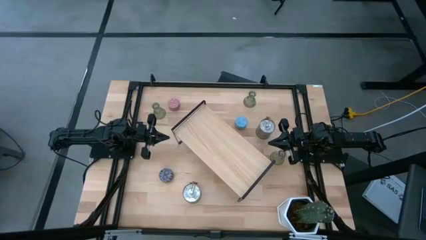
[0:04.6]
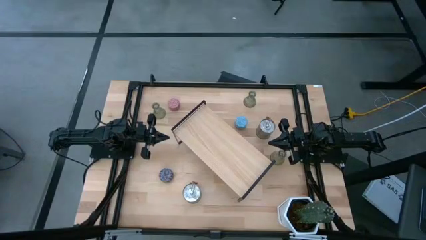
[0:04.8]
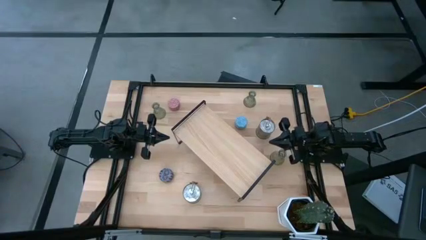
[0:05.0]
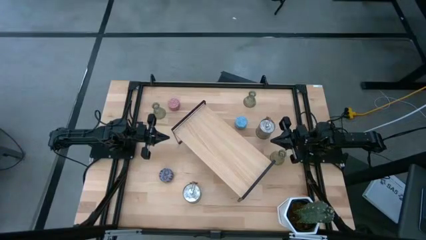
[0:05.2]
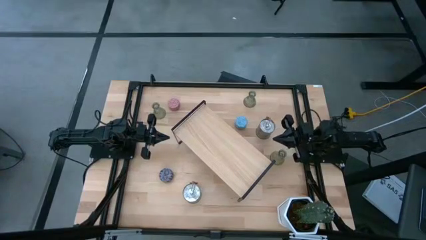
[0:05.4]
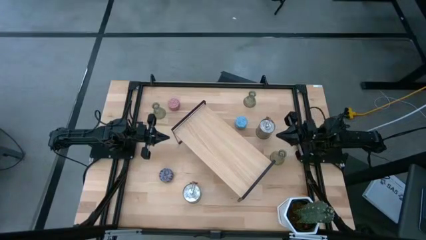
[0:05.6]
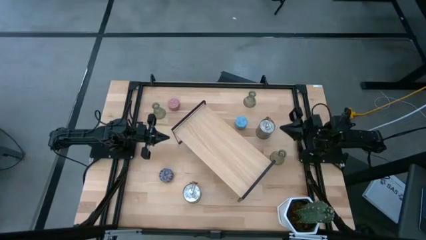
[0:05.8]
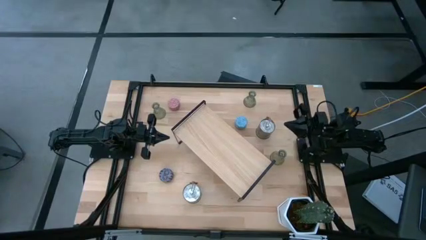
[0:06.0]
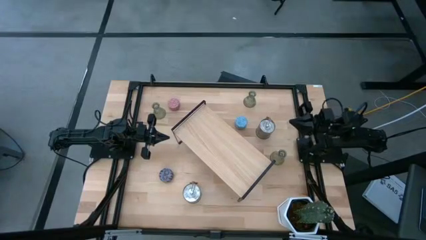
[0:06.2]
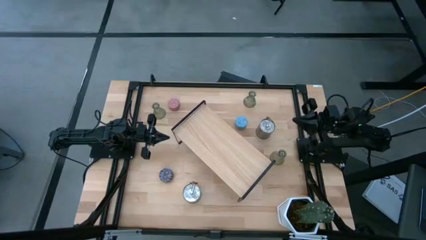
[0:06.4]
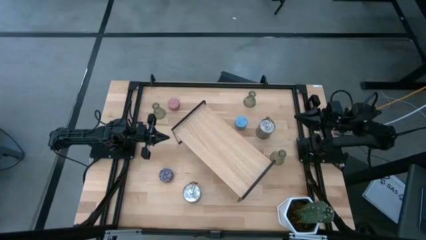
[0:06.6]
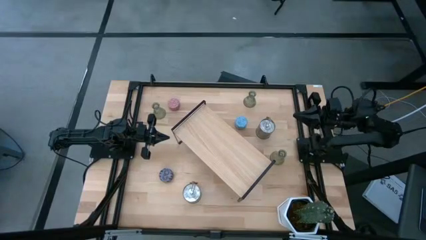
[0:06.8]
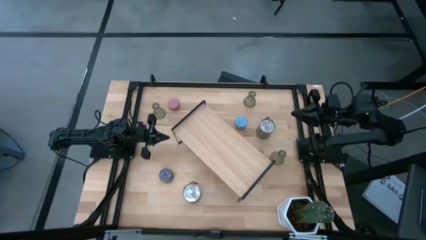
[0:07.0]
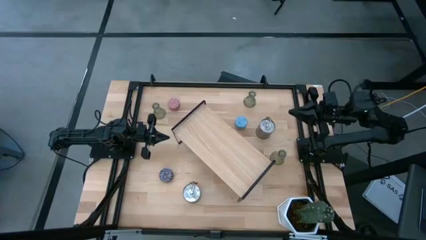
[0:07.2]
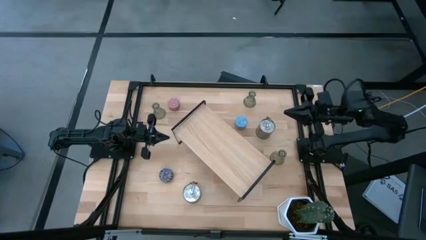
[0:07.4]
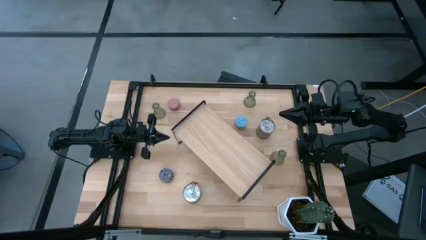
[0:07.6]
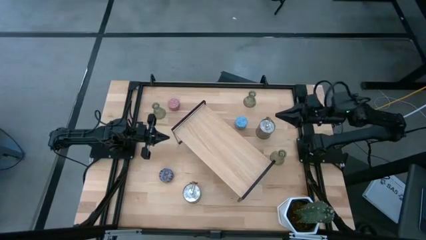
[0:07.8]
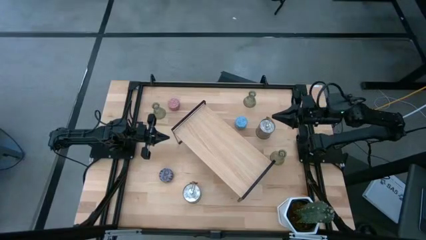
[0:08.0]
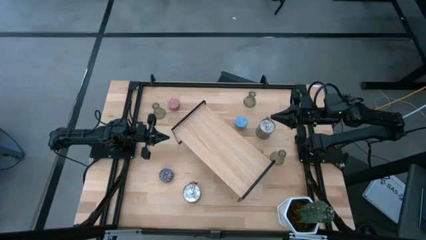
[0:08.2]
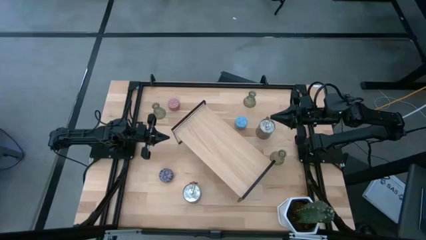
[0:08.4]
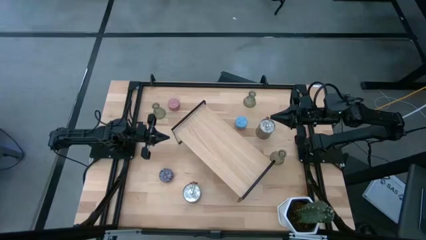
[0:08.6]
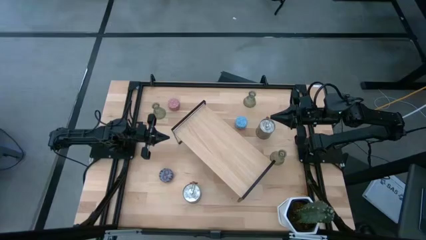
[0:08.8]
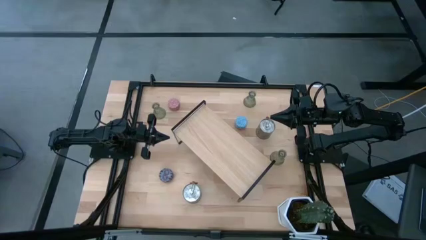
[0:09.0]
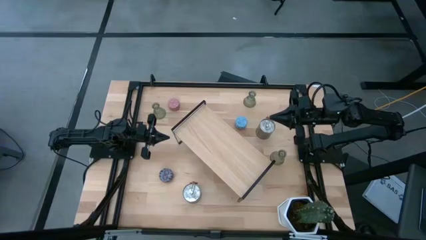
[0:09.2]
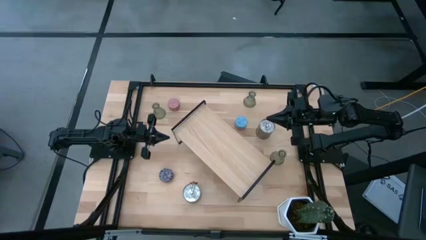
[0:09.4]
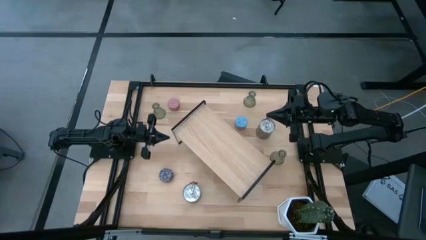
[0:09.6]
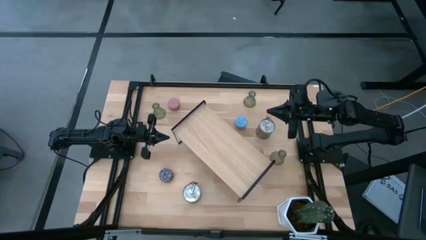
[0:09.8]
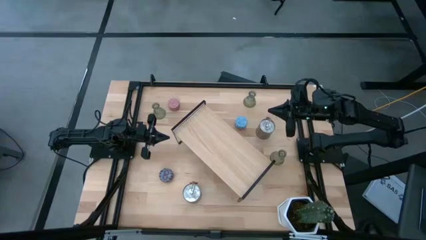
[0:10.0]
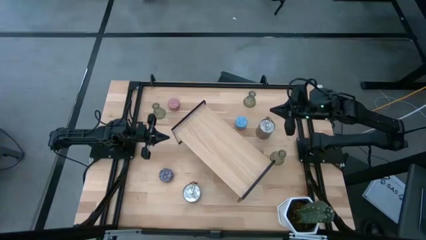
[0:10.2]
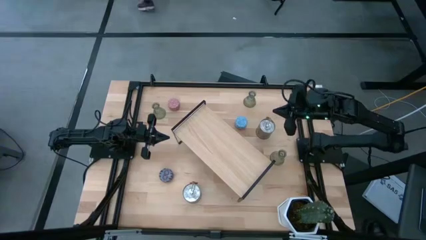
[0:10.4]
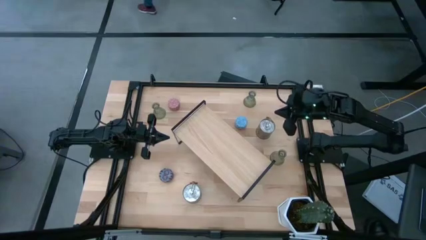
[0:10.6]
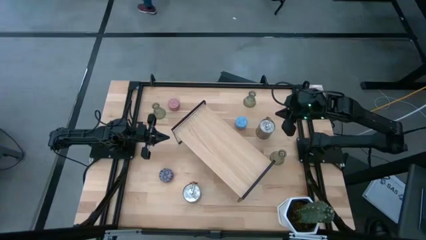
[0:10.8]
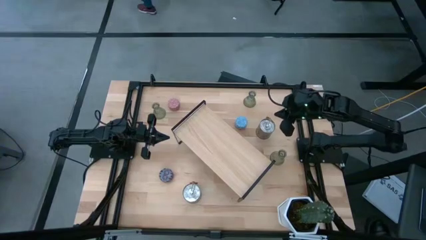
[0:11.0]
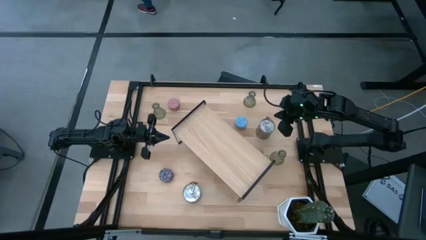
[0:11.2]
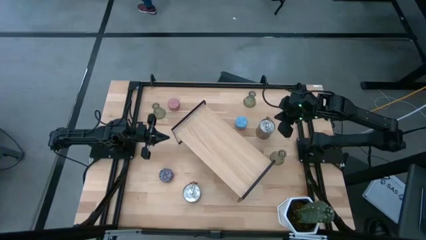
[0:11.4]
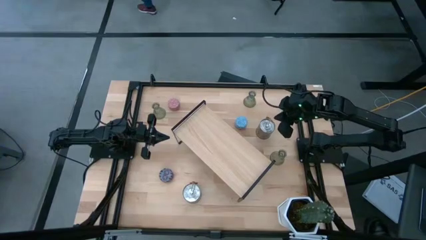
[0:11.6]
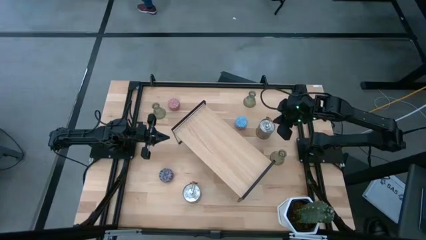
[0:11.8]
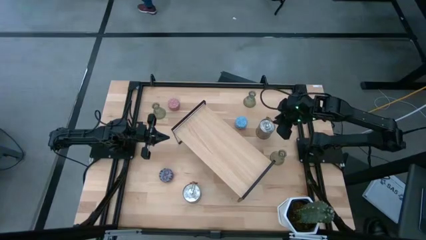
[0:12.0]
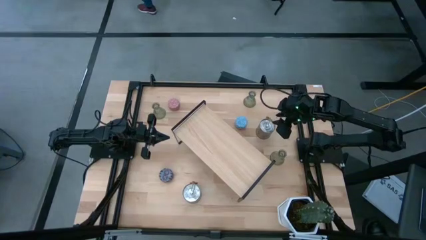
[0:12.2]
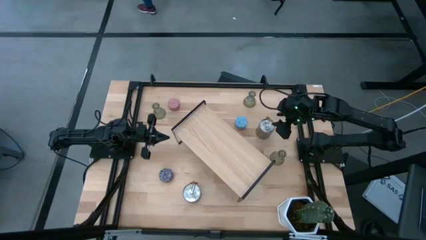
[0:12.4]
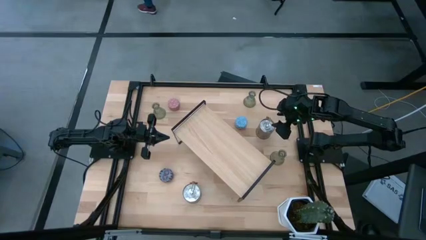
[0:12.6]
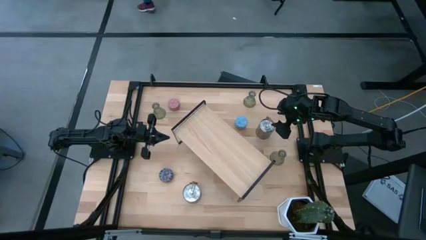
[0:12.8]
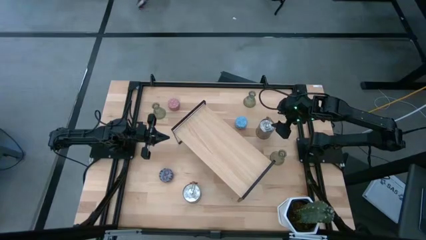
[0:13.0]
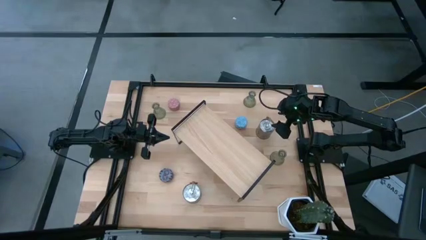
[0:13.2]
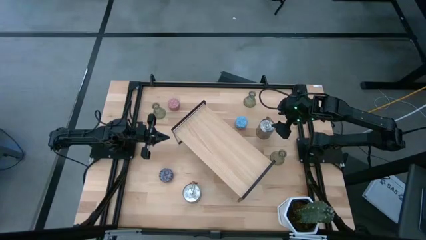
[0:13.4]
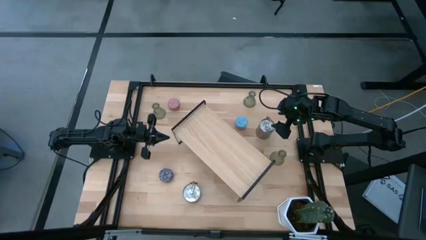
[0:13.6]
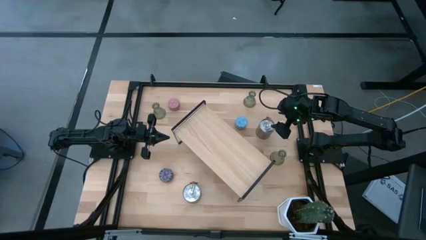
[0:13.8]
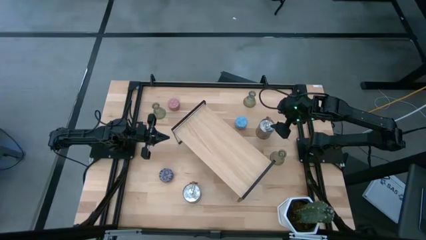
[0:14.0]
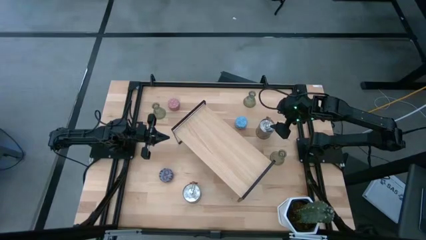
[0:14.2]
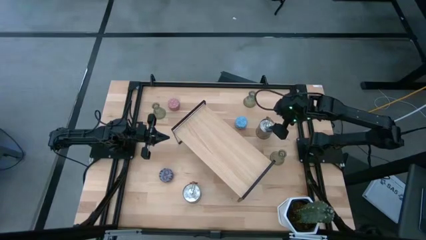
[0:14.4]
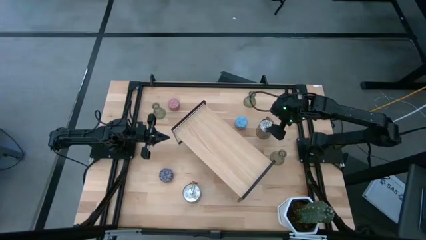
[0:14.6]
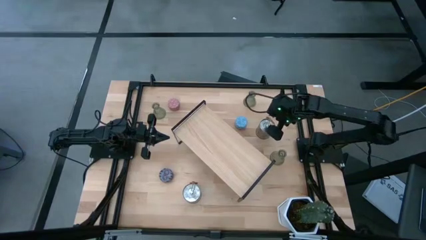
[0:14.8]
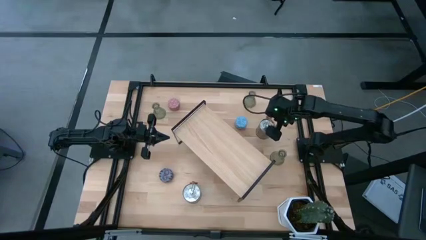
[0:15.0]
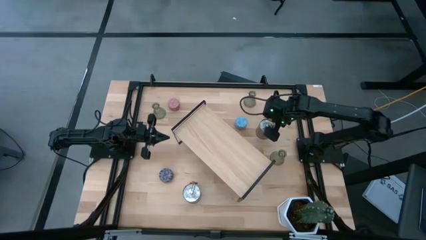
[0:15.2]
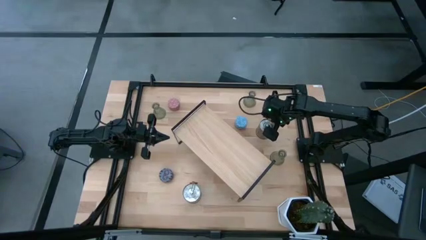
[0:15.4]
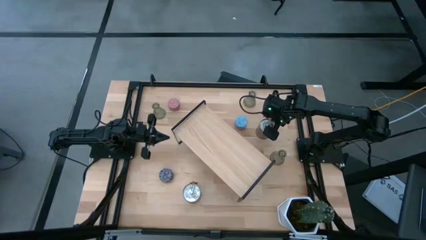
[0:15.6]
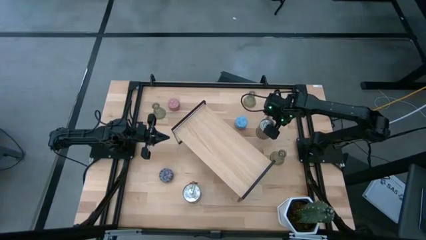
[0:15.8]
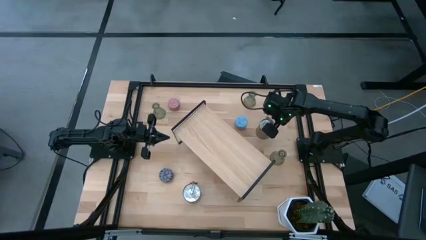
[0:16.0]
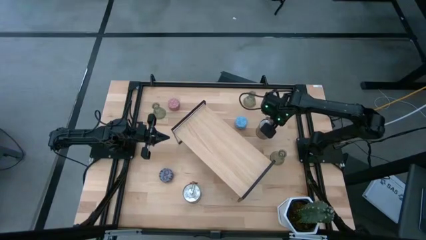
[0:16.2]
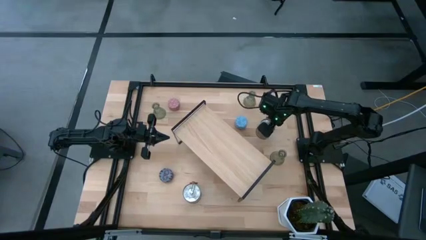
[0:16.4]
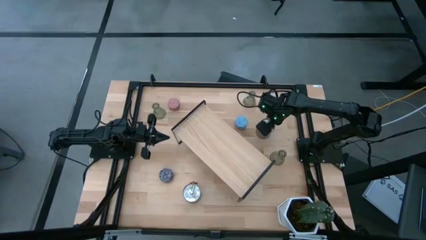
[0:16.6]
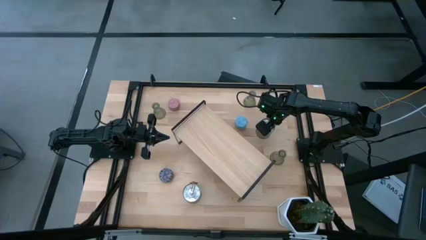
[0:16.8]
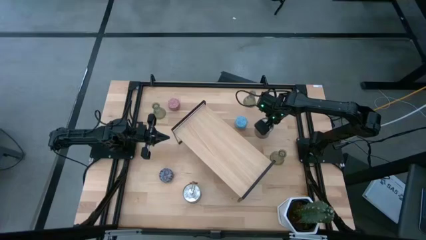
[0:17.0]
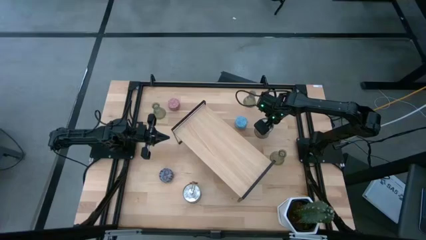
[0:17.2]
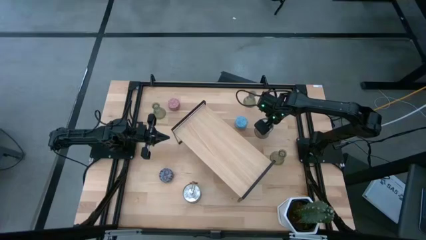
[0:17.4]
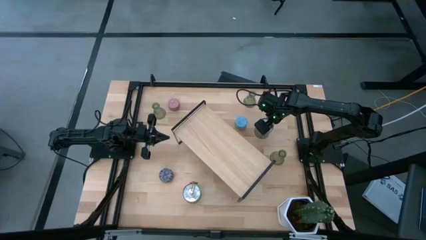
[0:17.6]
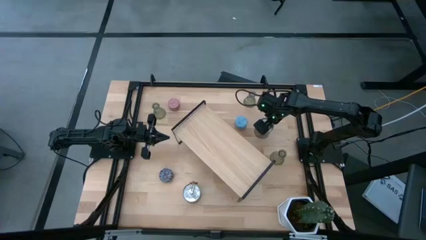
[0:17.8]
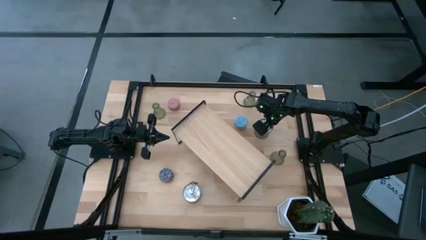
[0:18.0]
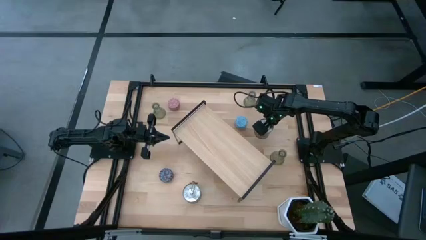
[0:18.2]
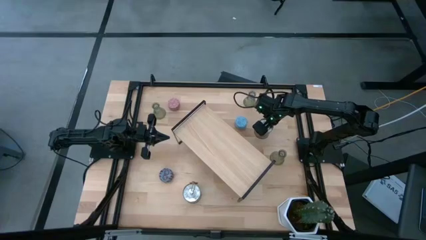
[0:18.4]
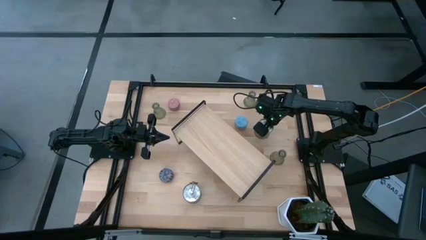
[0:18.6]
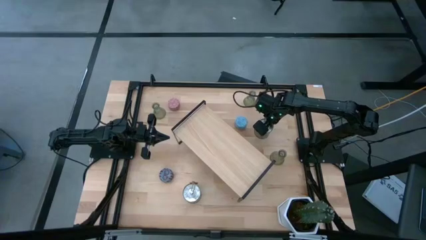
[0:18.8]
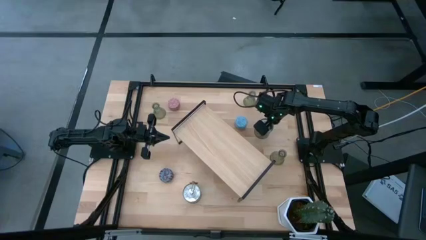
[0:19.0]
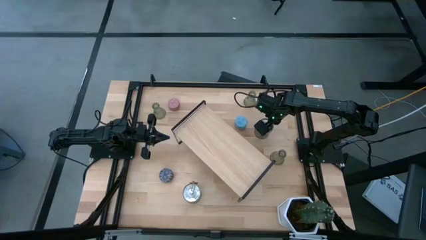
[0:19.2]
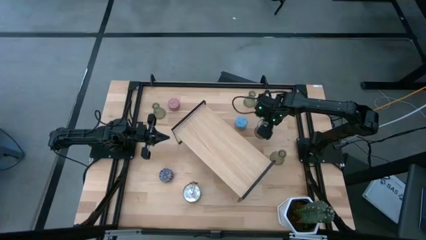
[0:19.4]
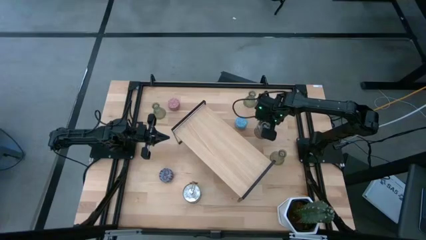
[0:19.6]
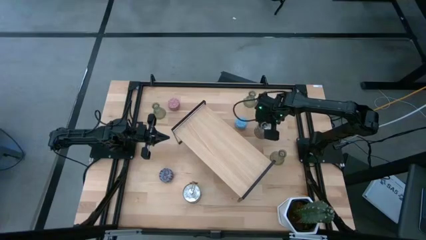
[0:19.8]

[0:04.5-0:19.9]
Task: Pick & Place candle stick holders
Put the top silver scented candle can on the shelf

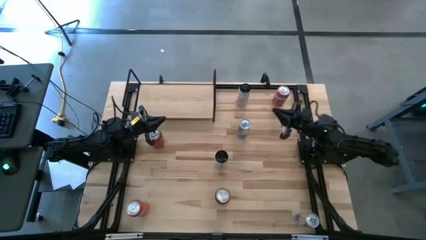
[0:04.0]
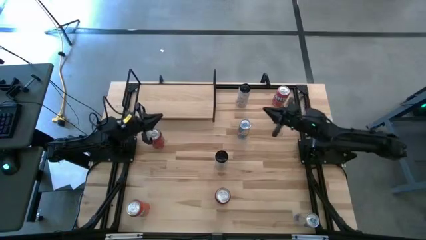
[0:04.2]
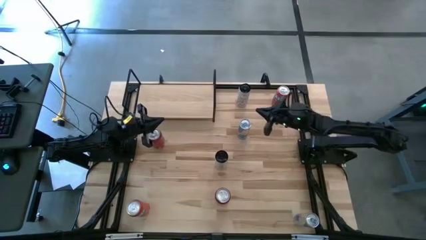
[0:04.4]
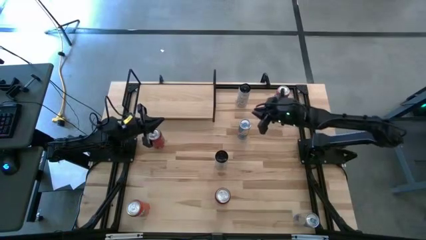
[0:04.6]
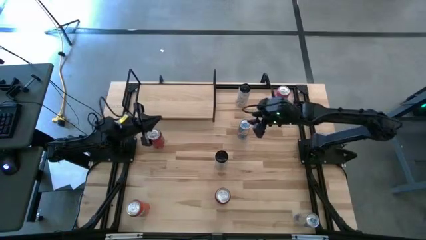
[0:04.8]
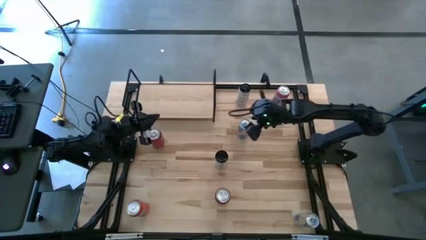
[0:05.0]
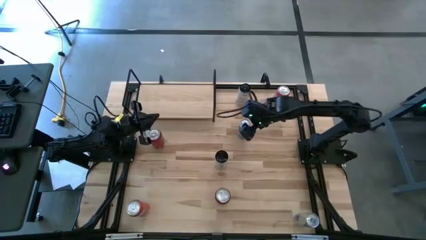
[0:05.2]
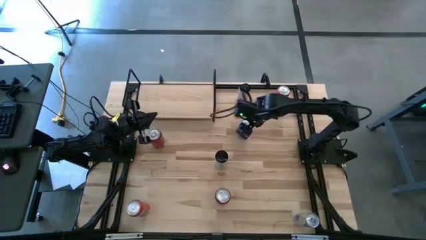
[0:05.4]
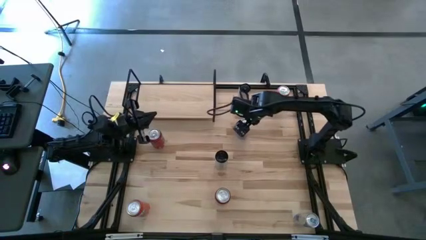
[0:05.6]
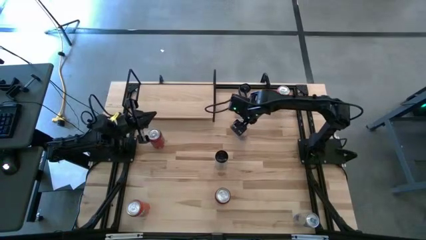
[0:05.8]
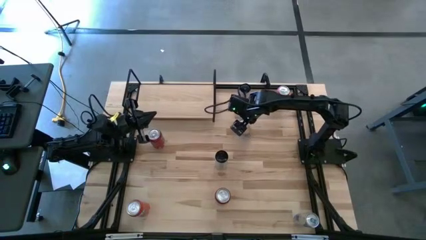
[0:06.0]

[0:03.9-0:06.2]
Task: Place canned beverage on shelf
Put the top blue soda can on the shelf
